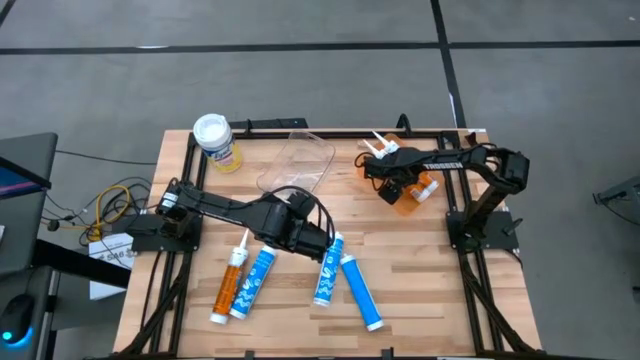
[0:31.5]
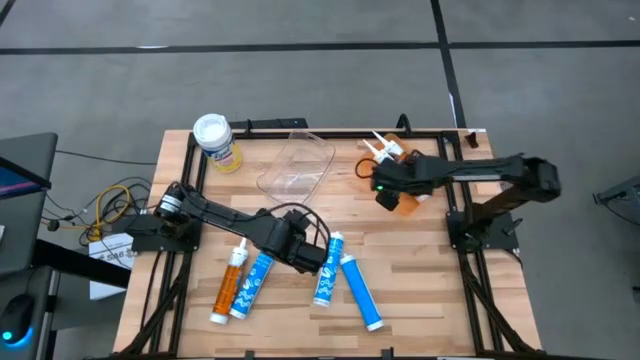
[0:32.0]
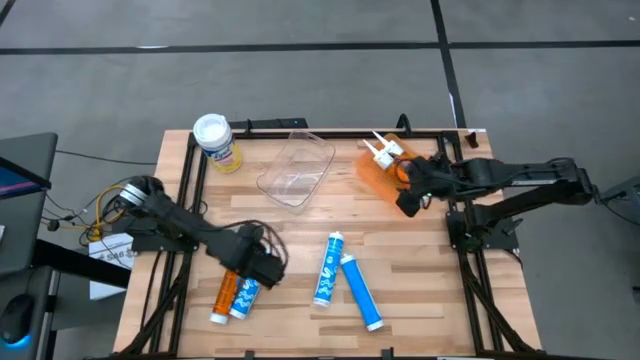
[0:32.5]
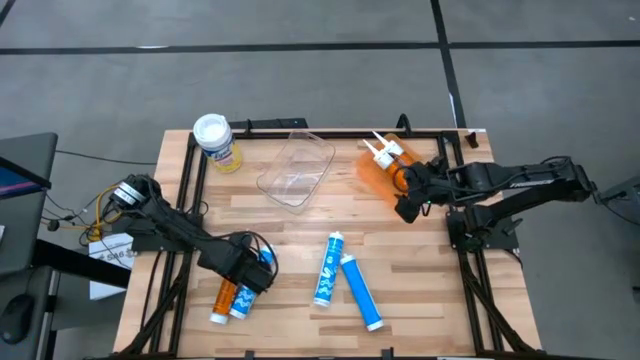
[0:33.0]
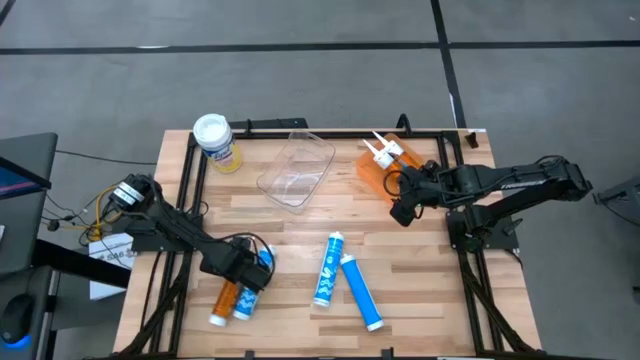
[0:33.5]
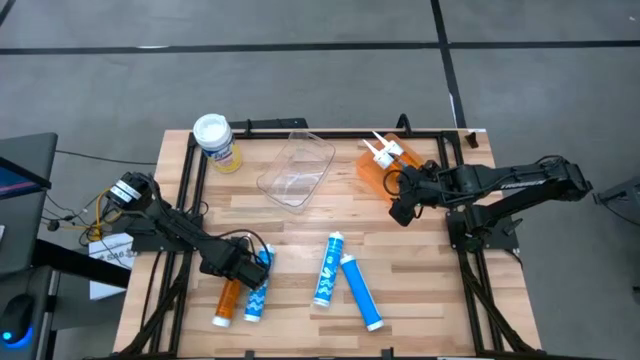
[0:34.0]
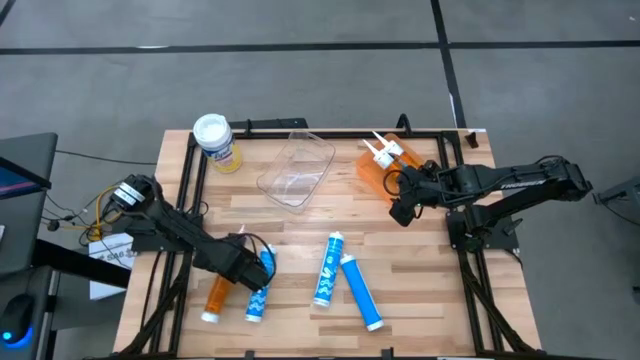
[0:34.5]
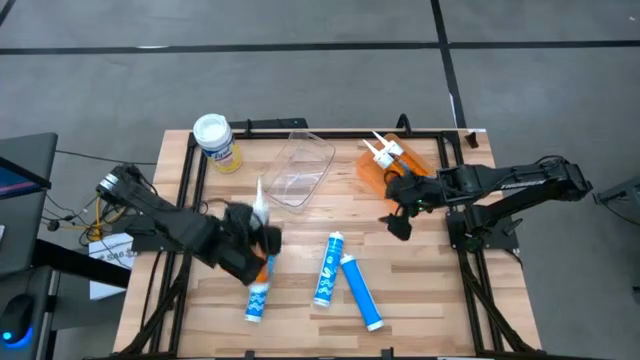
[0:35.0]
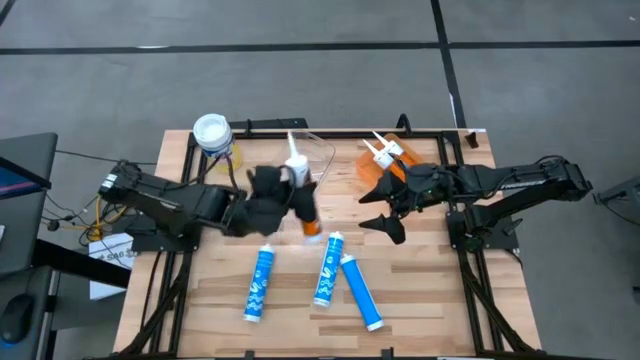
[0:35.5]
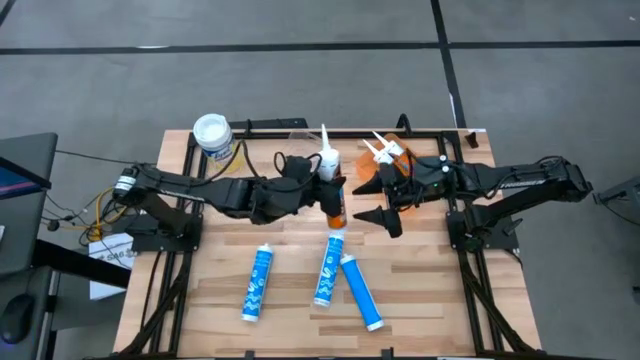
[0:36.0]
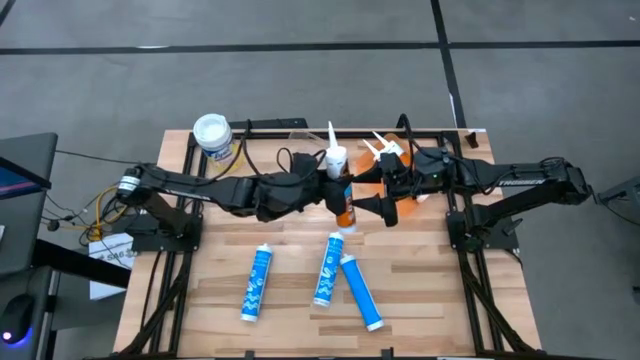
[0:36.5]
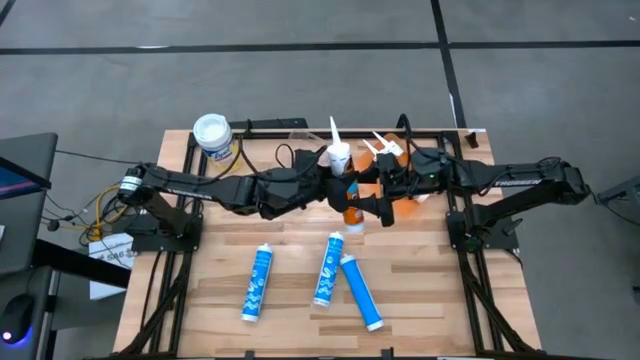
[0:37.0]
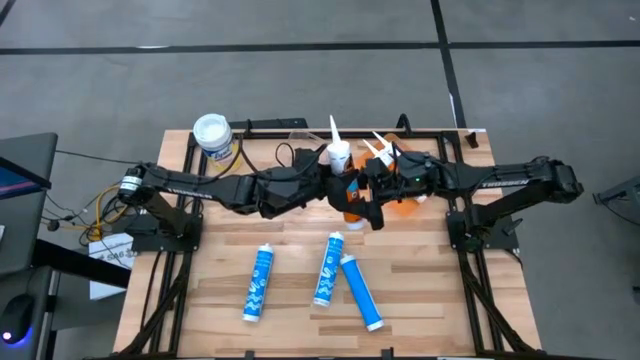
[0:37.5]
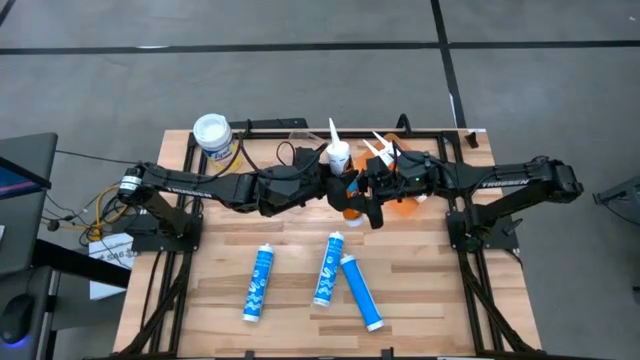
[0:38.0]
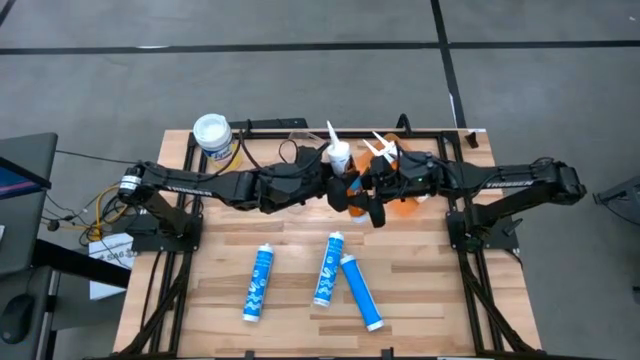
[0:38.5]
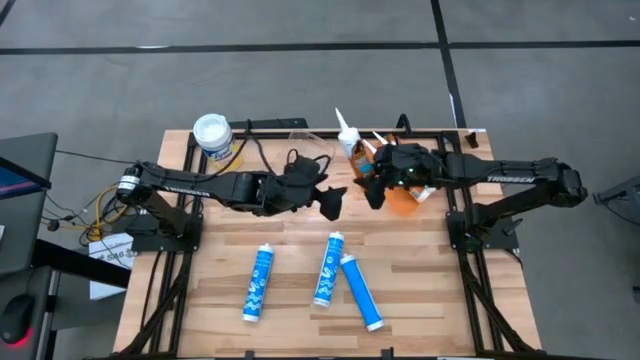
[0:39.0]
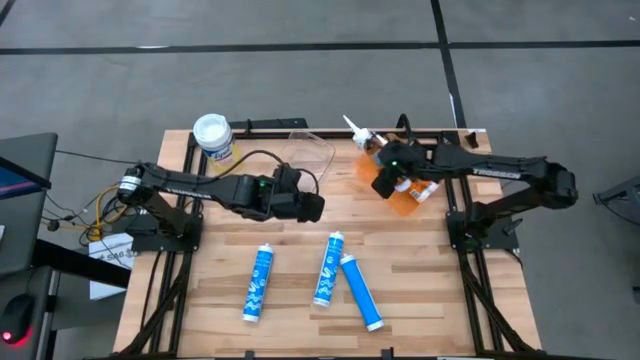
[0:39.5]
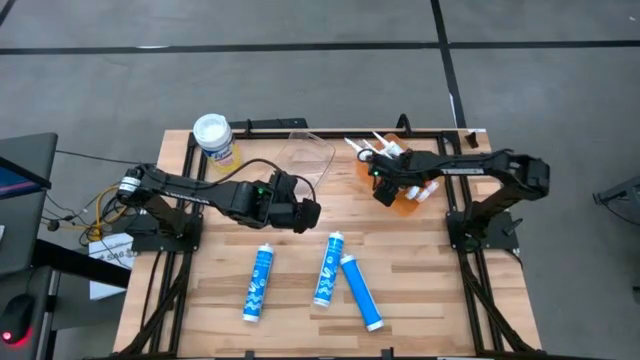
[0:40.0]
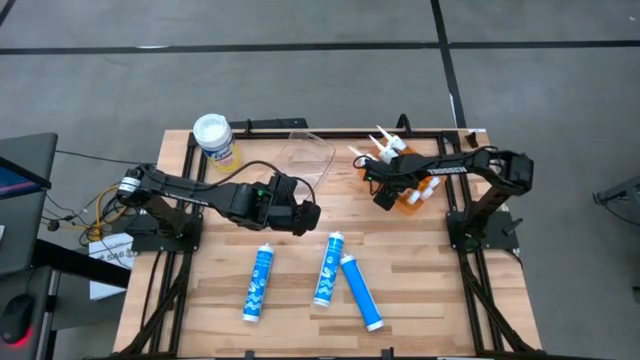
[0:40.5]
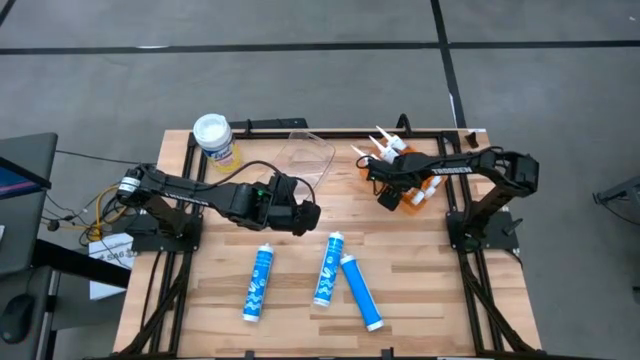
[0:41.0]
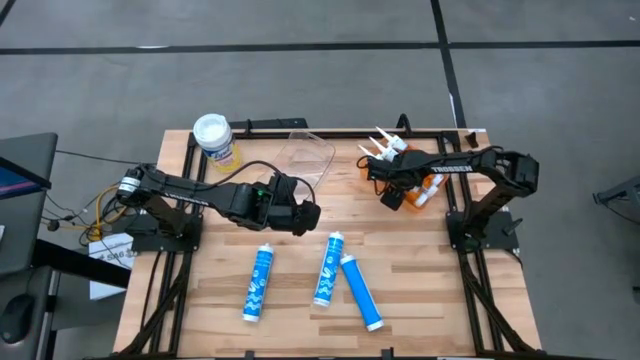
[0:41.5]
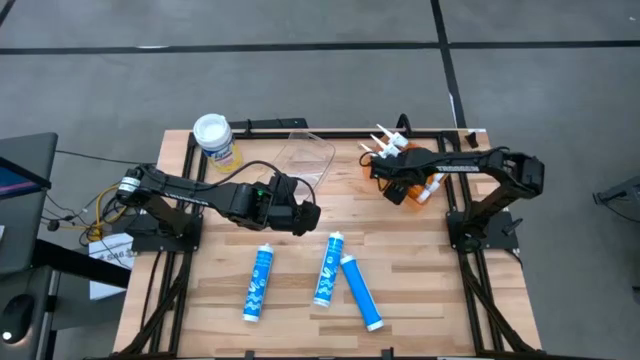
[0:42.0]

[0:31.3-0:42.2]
Task: Pick & place silicon tubes, Sealant and Lysol wipes
Put the orange sealant into the orange bin

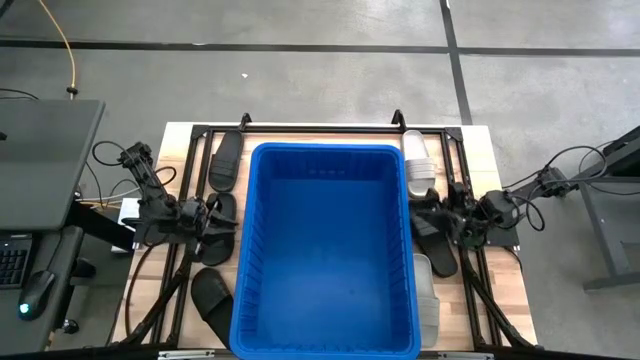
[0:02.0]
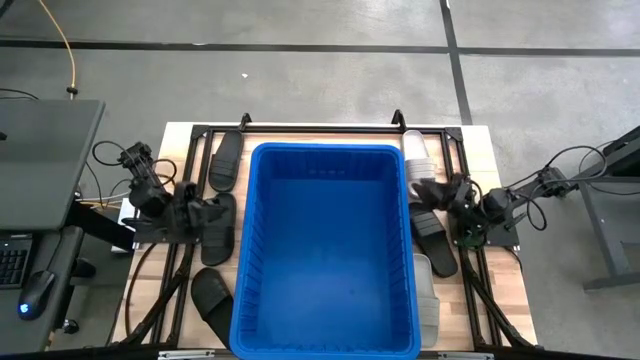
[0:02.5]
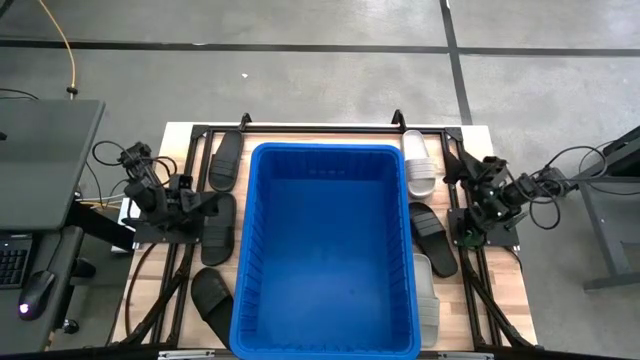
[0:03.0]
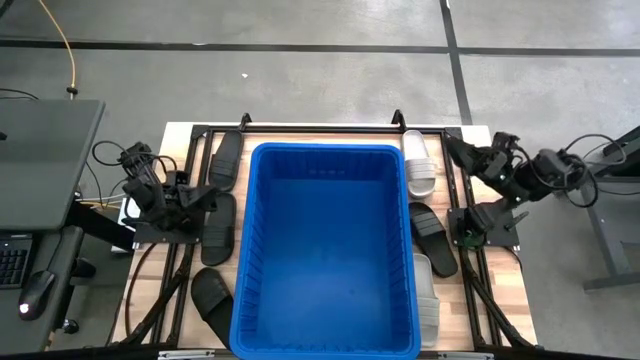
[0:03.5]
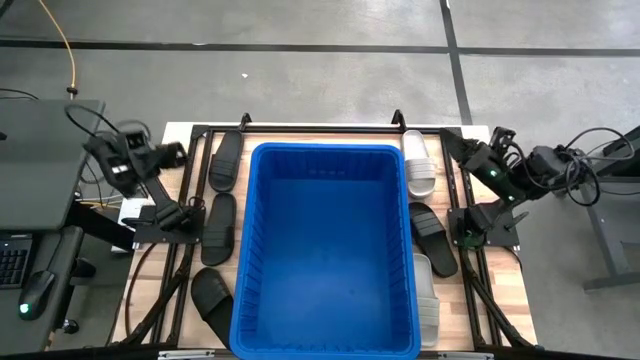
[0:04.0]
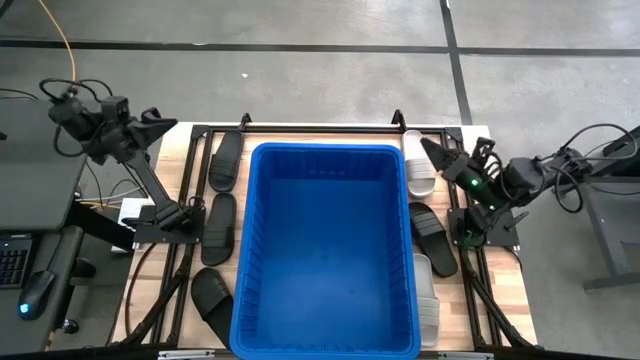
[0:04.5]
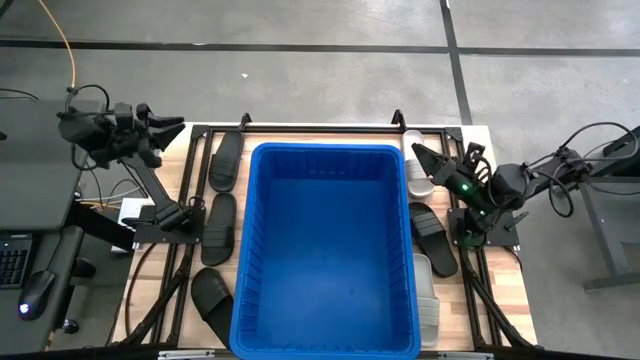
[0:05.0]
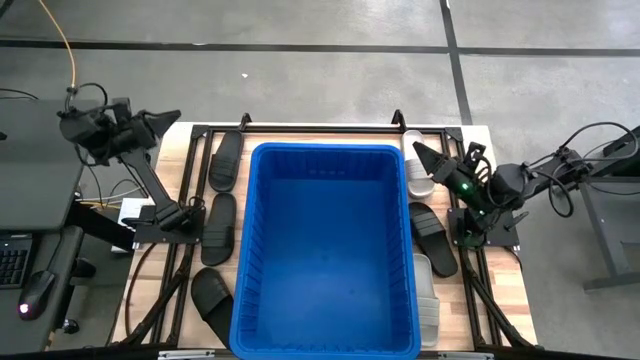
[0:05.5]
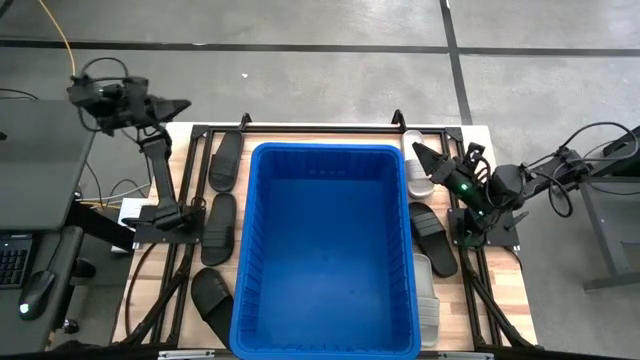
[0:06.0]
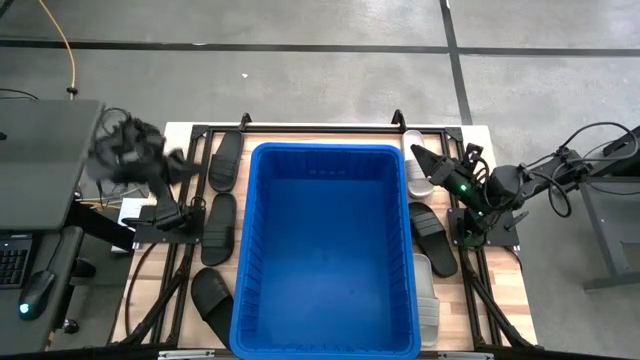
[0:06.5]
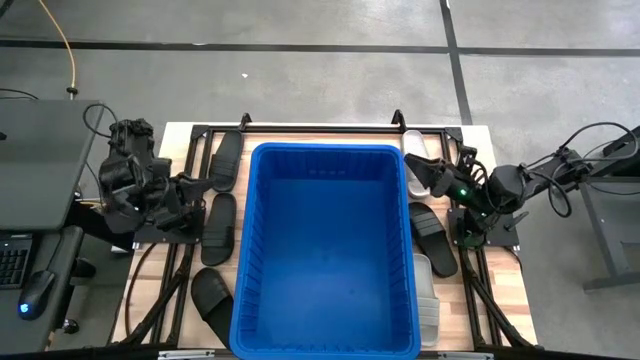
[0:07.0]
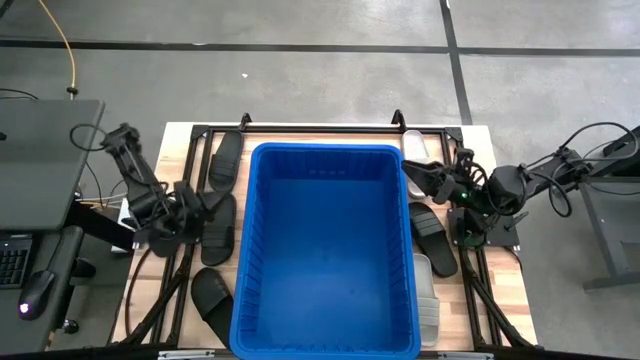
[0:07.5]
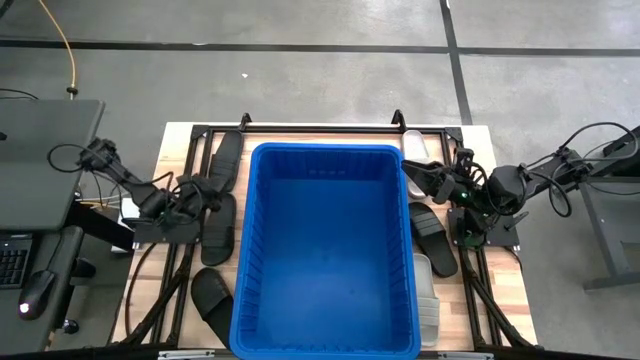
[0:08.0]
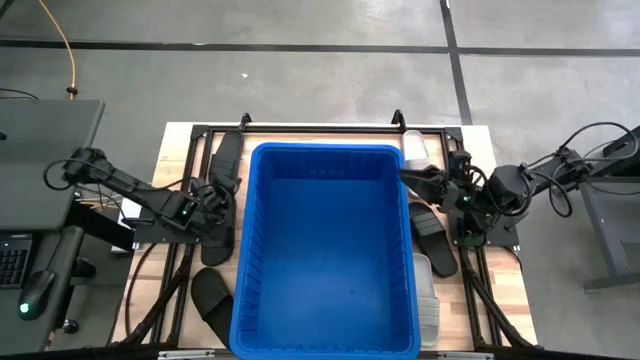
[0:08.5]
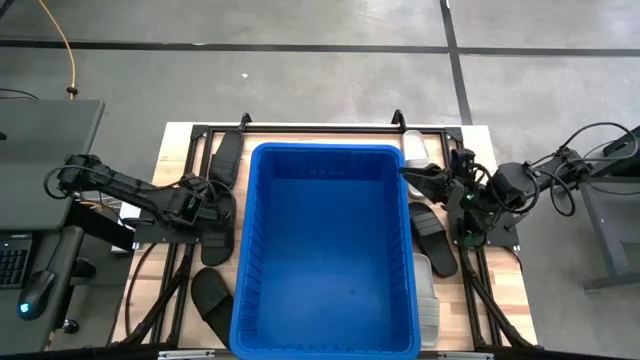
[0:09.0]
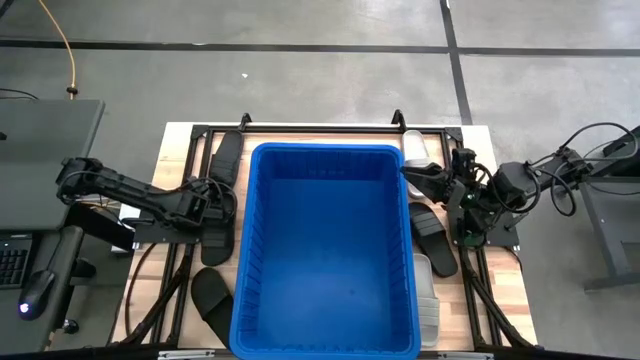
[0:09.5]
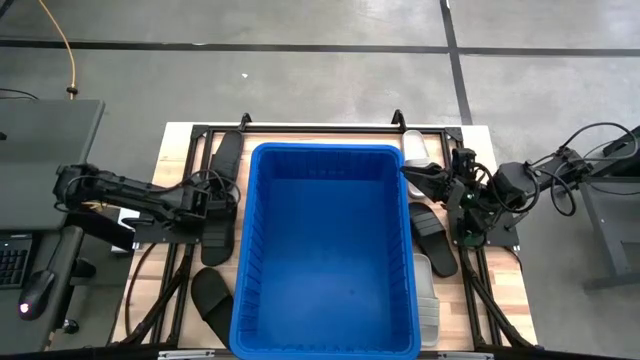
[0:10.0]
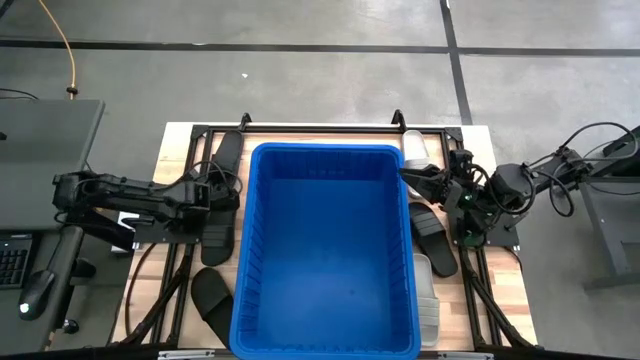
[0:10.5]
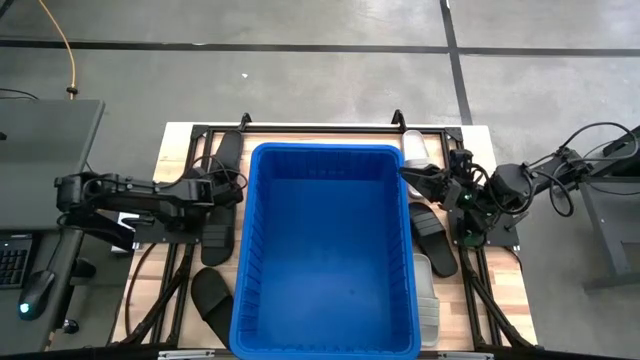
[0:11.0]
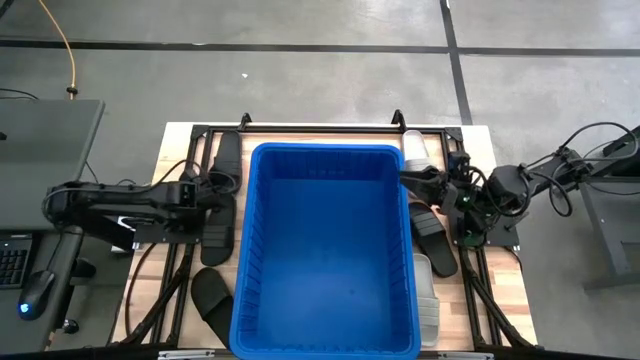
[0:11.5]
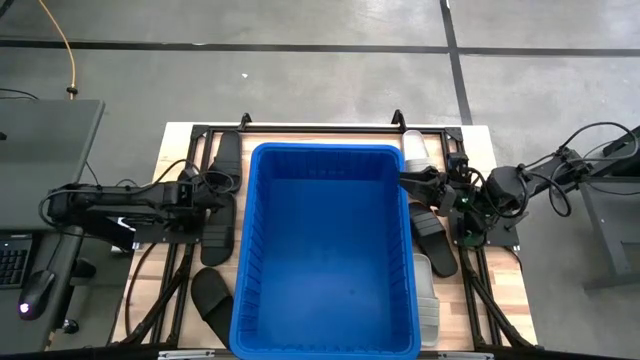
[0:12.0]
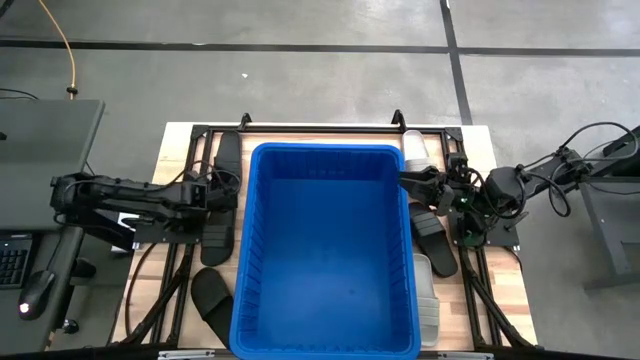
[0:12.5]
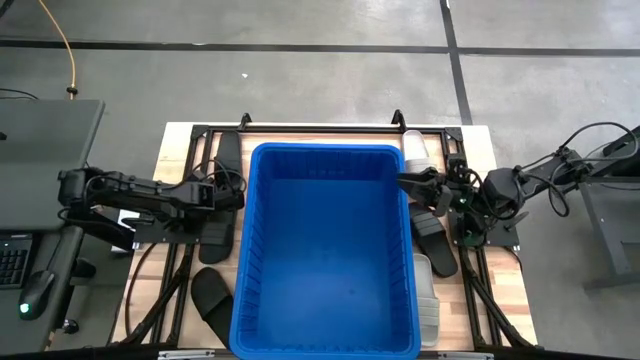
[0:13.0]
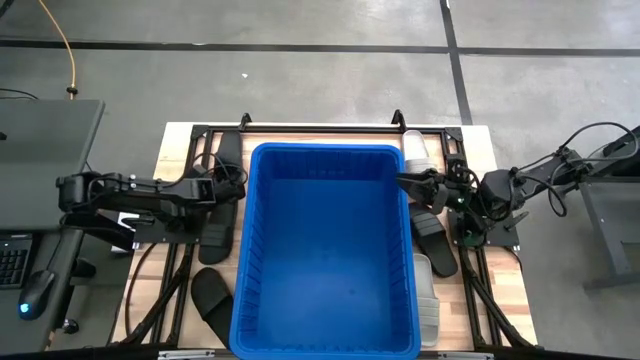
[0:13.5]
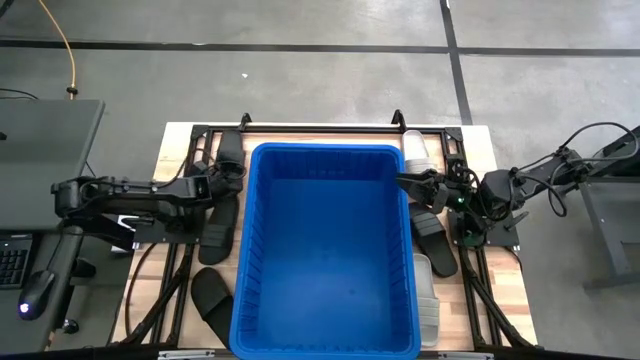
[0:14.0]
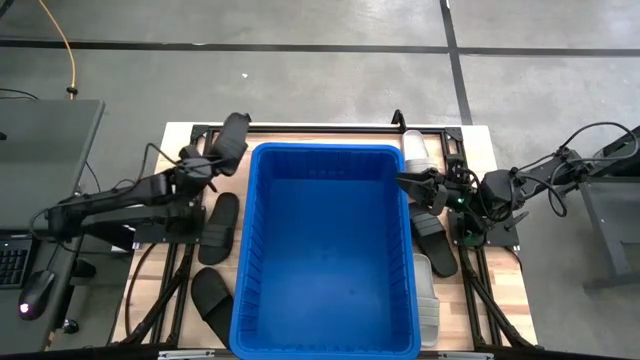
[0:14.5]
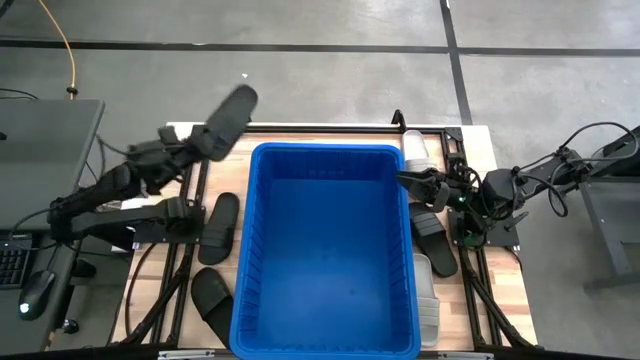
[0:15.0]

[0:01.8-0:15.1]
Task: Pick and place slides into bin
Put the top left black slide in the bin
